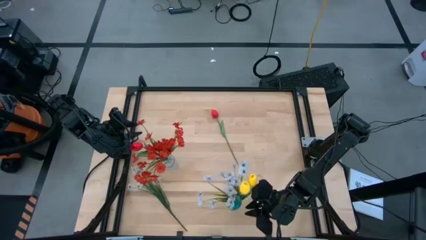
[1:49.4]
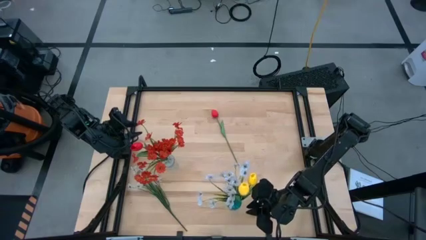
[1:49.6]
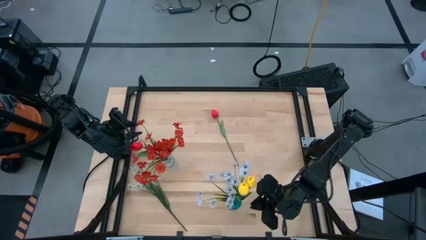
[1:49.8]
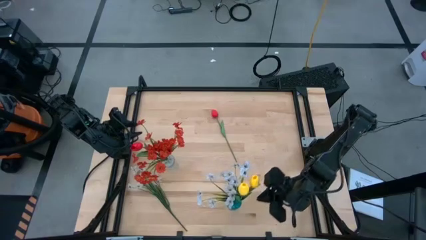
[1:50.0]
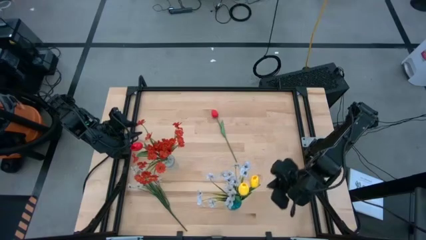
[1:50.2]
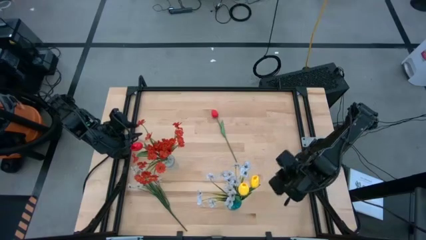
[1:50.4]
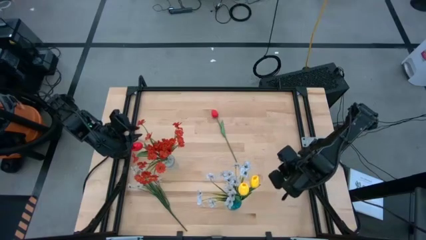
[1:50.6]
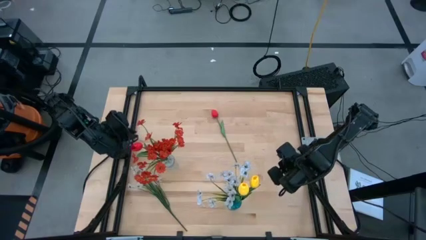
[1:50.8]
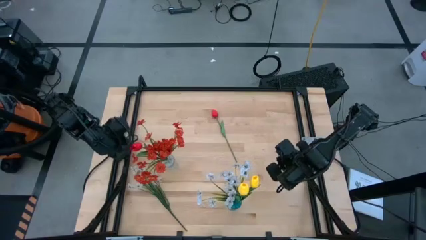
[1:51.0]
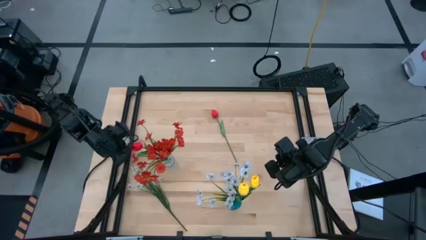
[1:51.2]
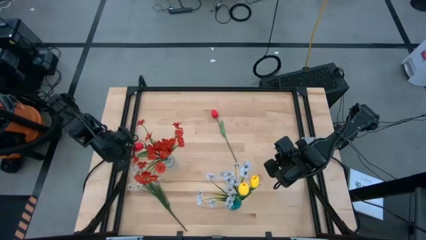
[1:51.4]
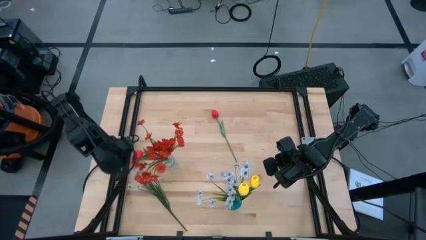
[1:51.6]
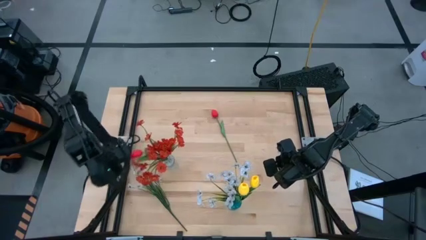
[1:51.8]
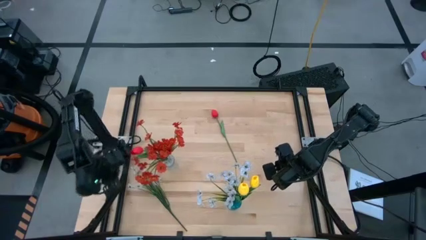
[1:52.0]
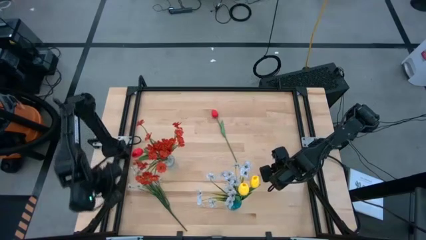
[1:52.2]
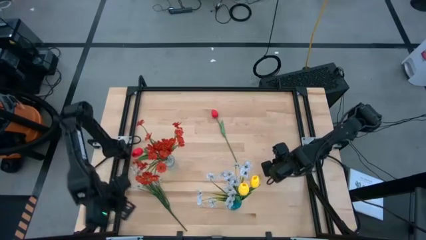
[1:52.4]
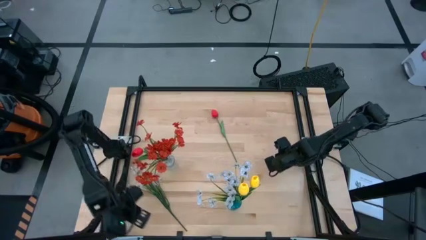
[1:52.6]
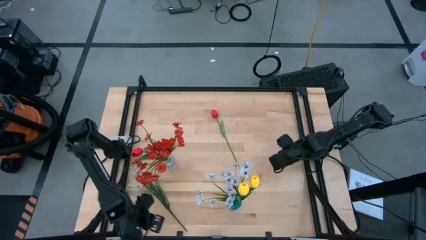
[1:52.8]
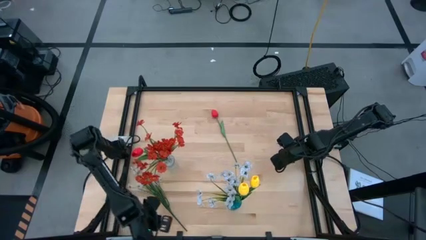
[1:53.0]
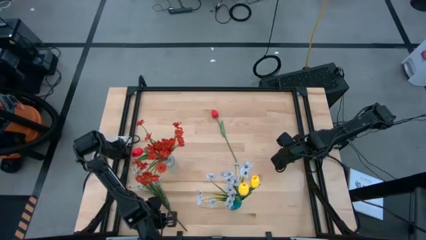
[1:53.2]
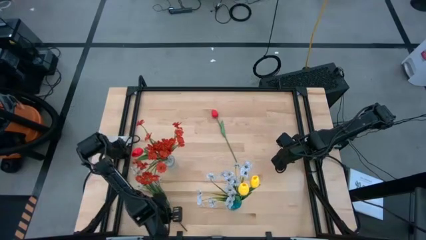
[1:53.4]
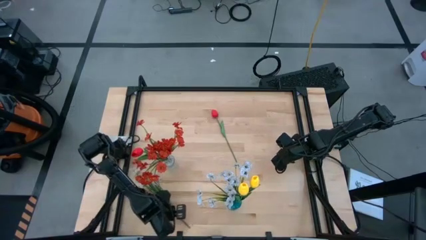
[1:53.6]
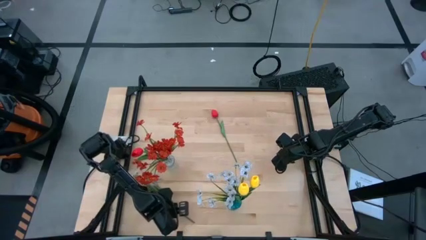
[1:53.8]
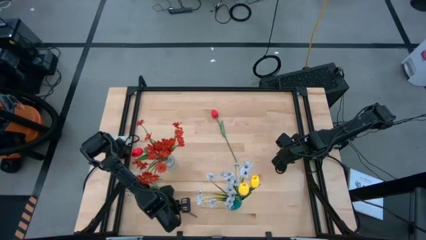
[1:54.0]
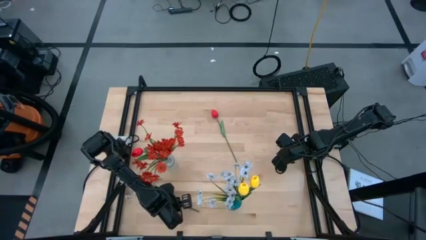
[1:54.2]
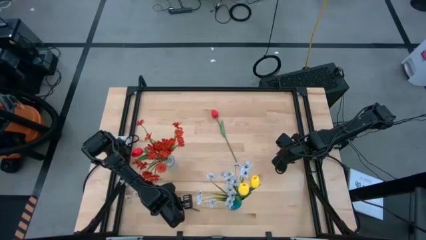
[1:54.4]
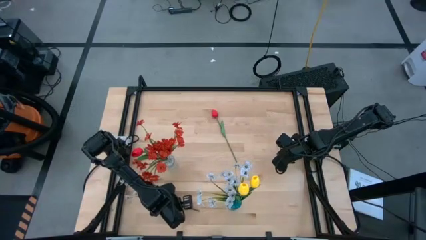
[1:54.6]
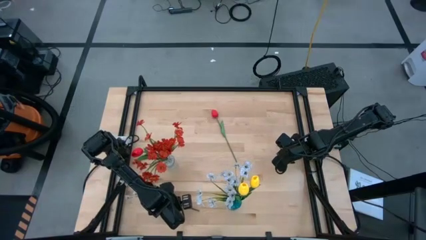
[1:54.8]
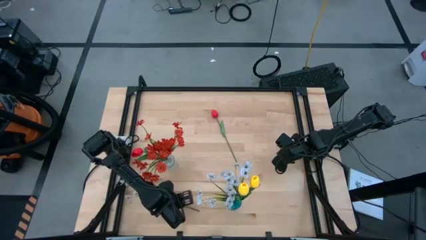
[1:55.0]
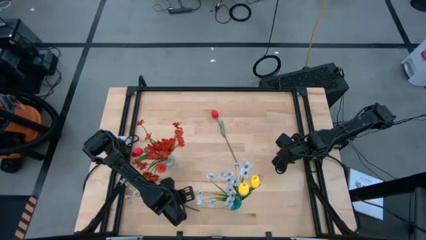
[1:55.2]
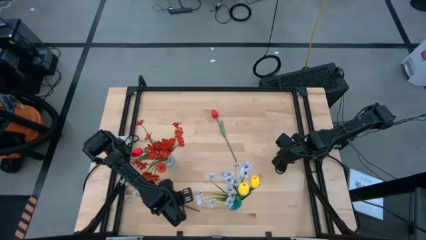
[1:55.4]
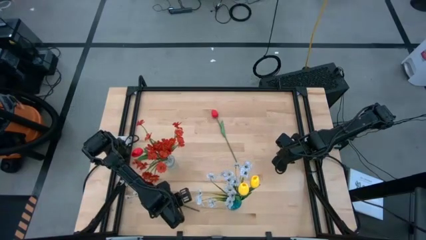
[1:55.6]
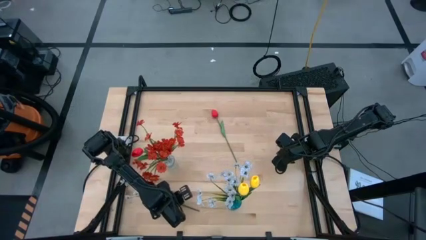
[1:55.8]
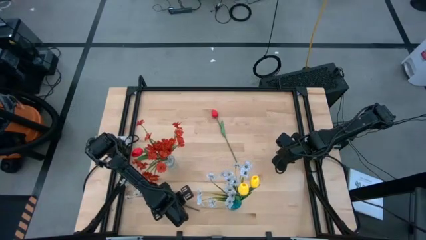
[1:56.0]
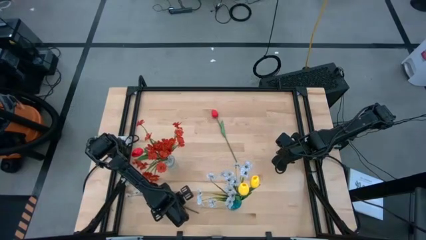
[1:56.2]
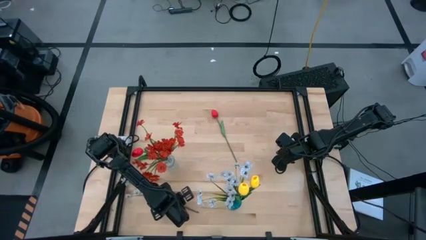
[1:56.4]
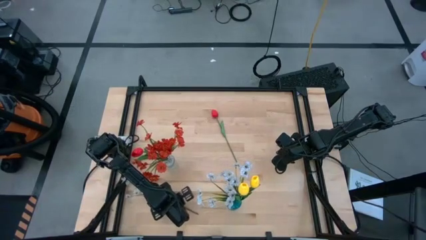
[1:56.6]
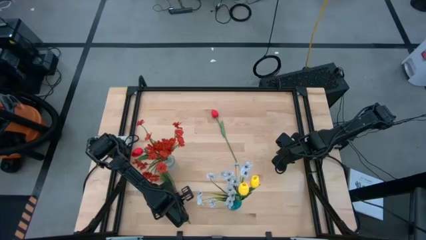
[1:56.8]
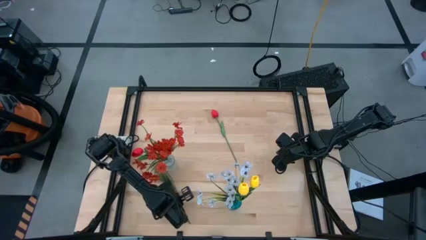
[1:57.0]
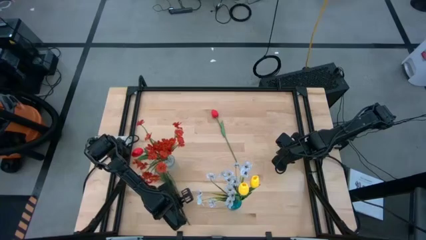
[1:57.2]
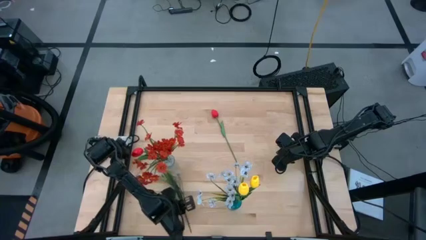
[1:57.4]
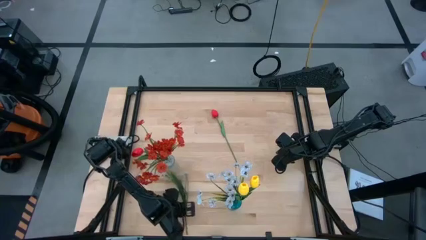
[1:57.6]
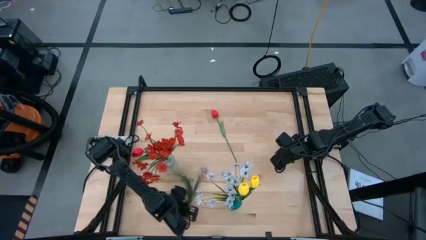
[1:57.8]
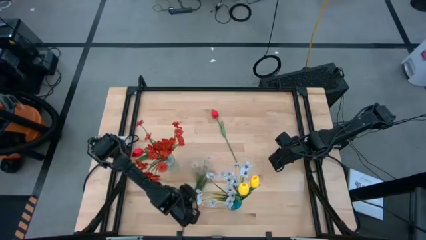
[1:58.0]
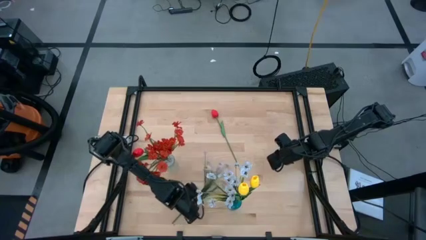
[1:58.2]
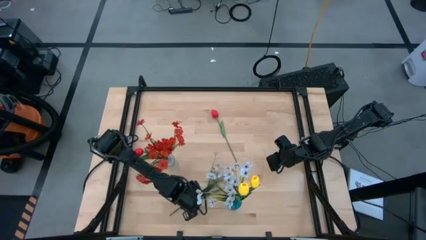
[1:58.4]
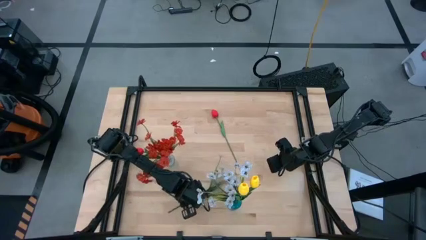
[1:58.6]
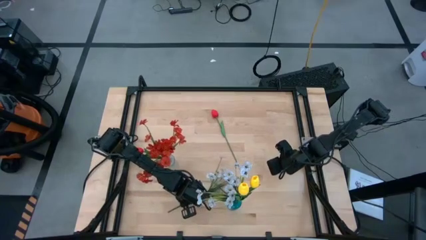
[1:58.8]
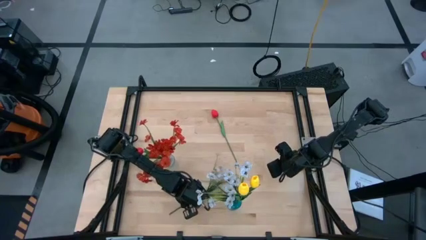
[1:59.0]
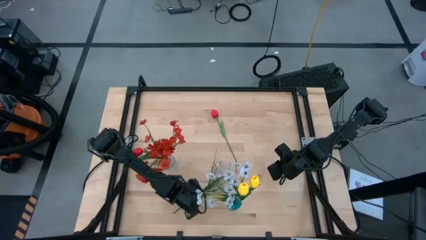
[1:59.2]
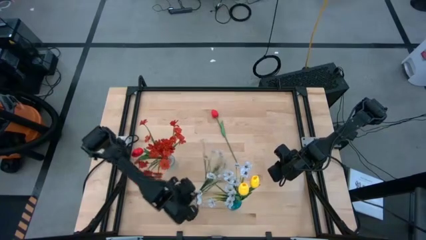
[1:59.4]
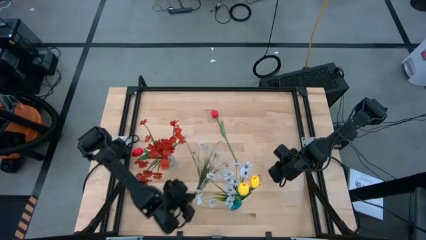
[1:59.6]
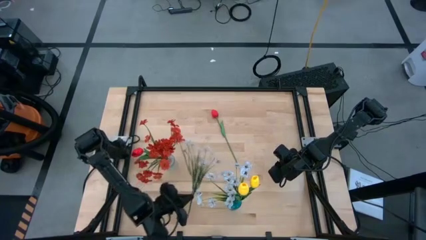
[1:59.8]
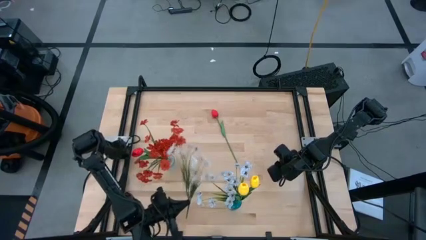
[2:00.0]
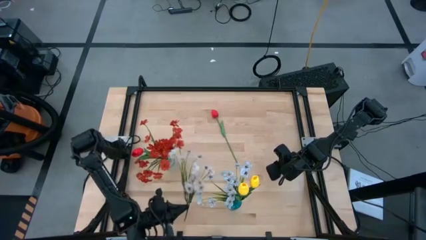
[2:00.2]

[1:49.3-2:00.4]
Task: Sort flowers into vase by color
Put the white flowers into the blue vase

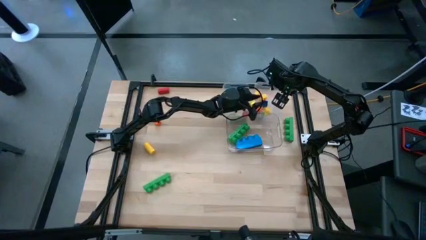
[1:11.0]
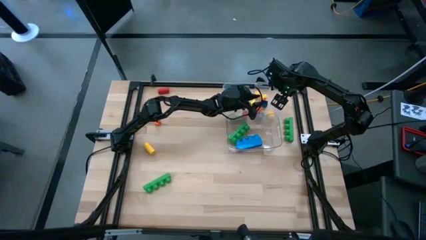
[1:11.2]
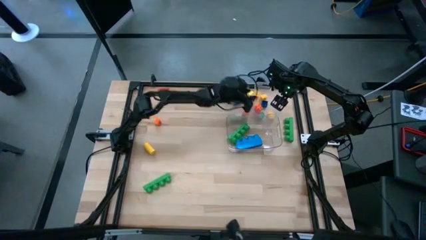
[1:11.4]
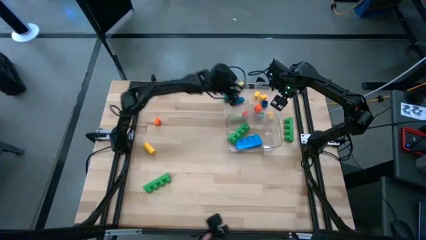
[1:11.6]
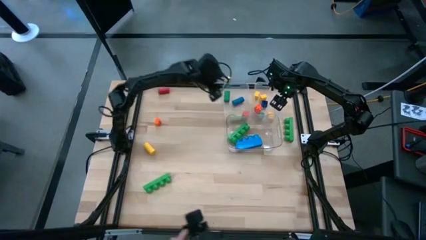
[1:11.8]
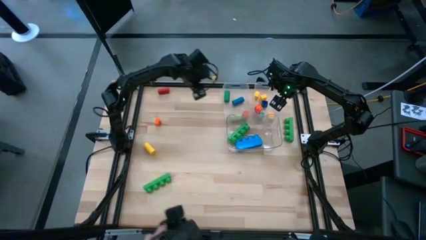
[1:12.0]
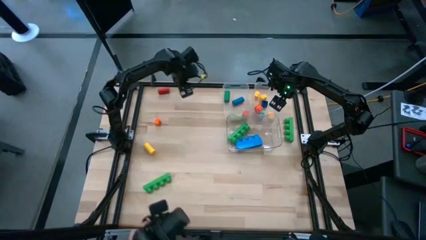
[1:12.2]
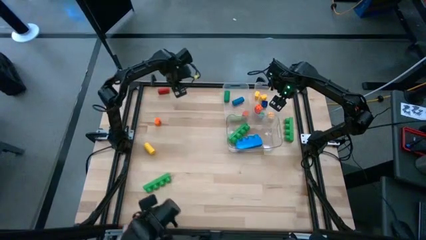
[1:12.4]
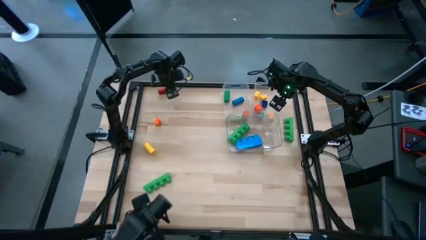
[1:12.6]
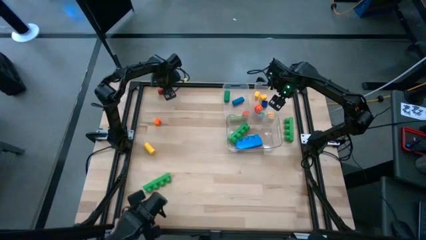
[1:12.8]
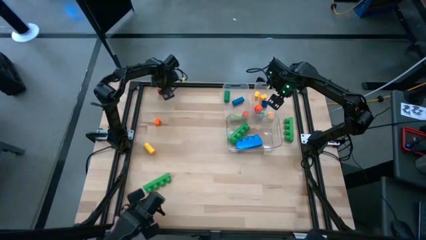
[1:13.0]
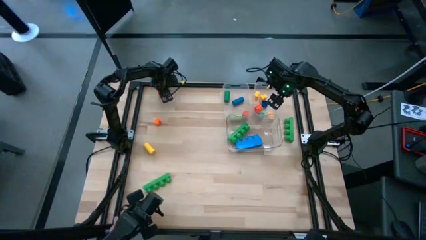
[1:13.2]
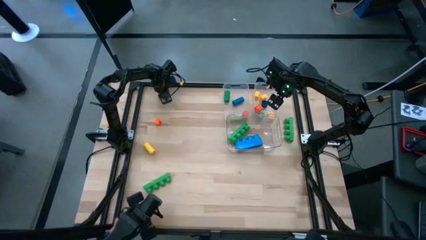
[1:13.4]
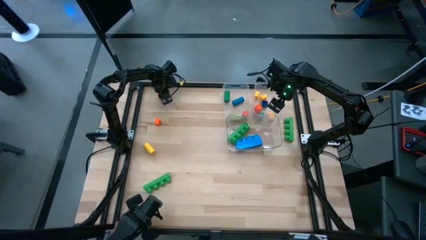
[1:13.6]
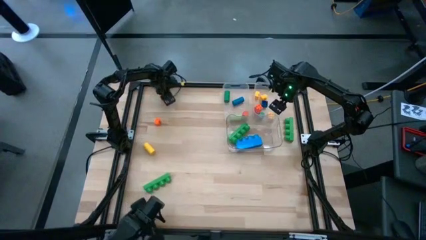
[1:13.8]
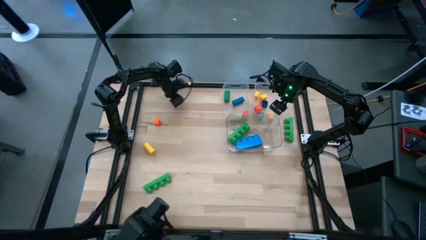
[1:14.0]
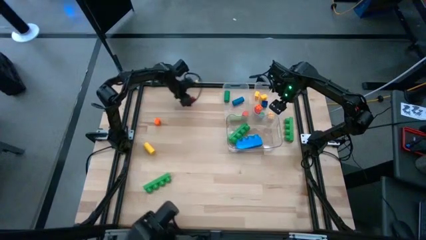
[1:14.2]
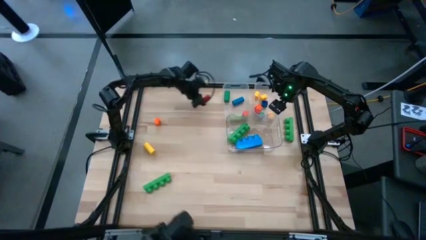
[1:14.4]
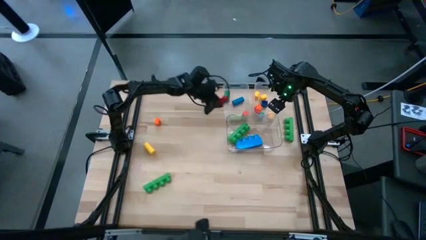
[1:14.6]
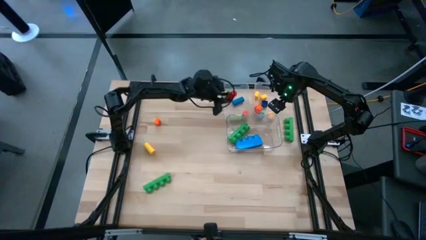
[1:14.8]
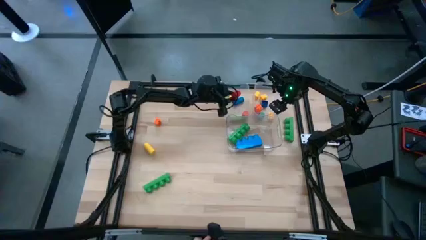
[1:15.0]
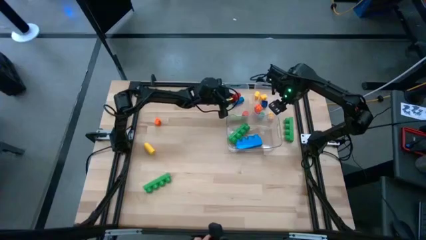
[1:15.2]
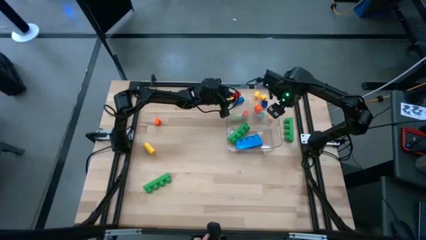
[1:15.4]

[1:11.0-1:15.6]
Task: Sort blocks by size
Put the red cylindrical game piece into the left transparent bin

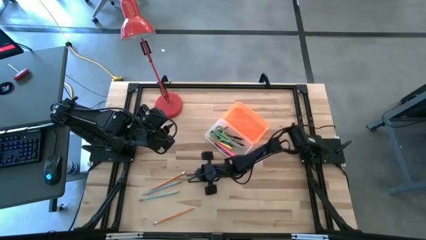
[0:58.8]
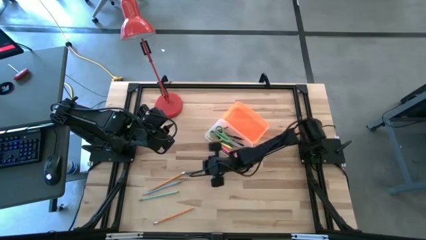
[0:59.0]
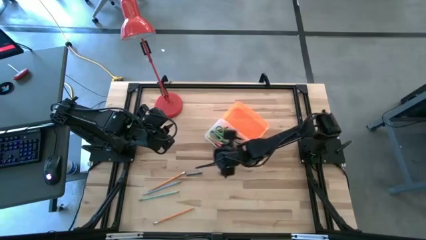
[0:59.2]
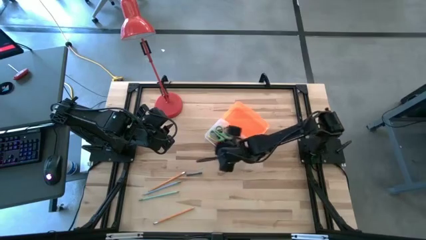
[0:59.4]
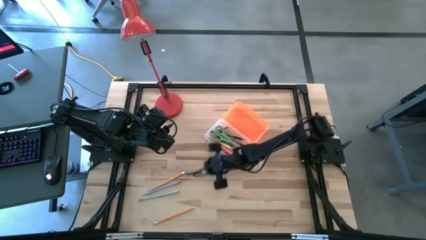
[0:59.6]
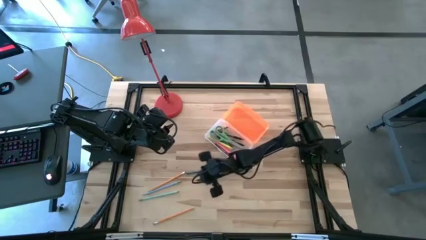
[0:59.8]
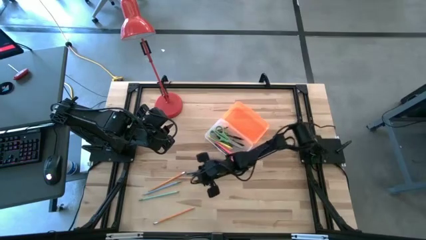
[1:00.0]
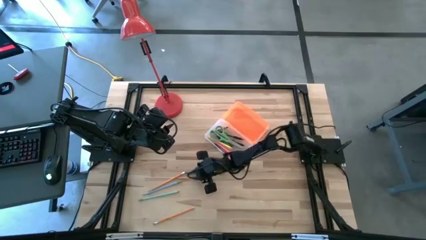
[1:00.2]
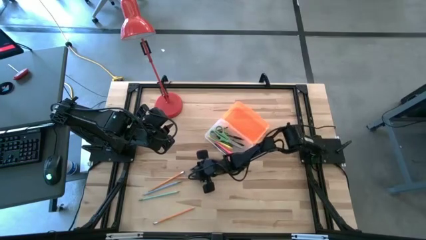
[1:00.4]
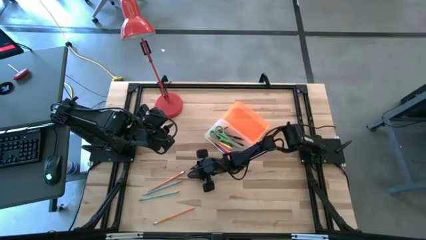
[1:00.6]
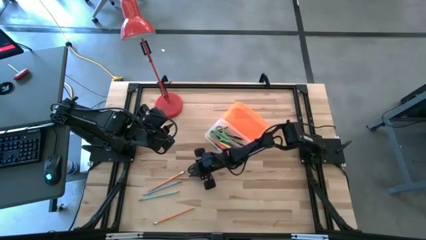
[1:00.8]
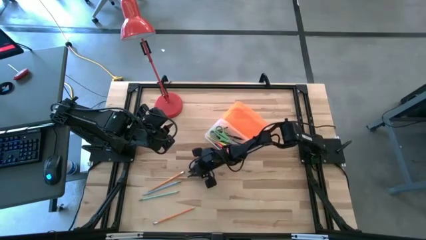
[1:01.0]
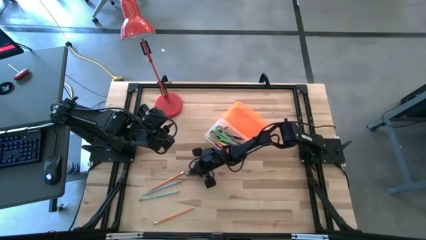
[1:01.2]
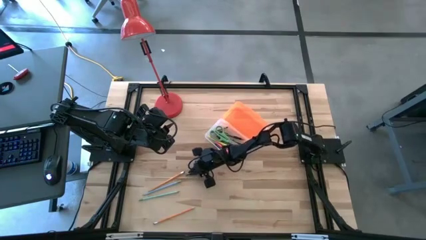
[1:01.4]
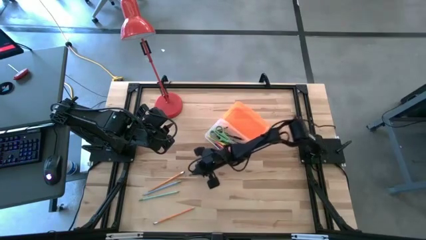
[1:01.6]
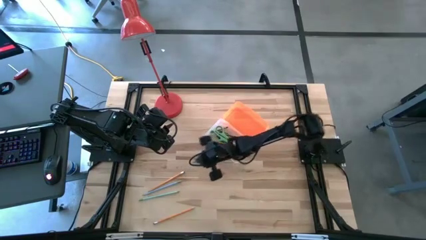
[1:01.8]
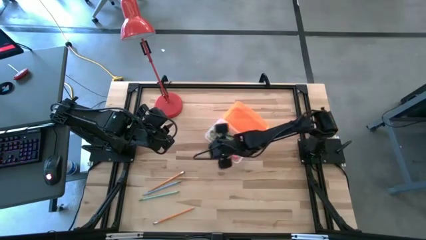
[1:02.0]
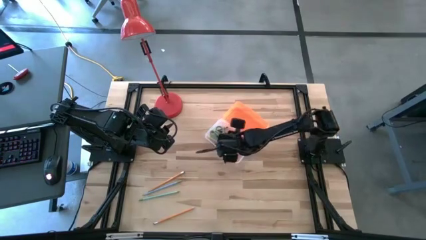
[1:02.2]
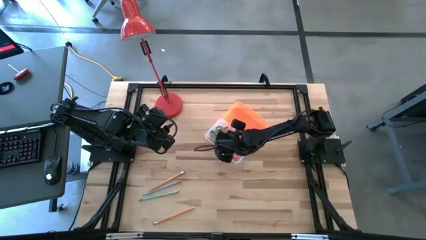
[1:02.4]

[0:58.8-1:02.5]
Task: Pick & place school supplies into a supply box
Put the green crayon into the supply box
